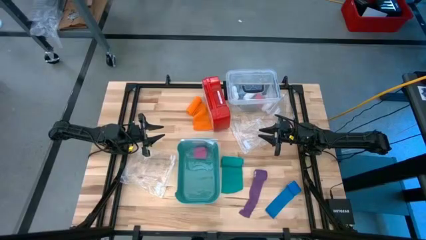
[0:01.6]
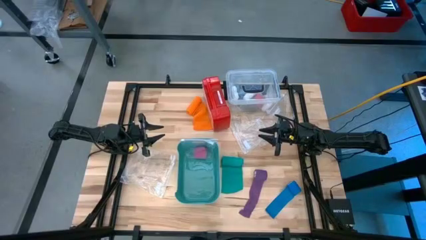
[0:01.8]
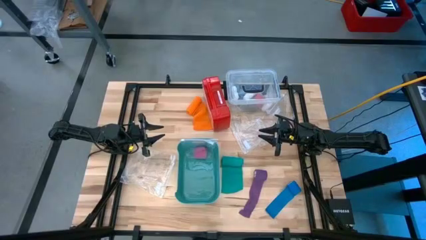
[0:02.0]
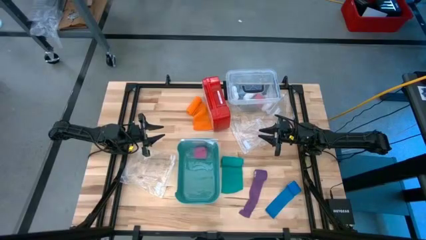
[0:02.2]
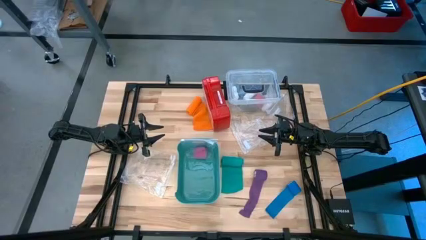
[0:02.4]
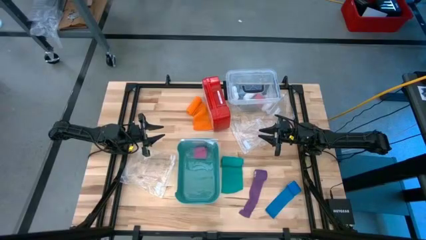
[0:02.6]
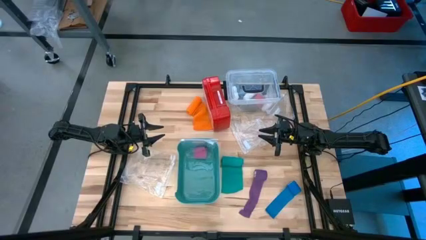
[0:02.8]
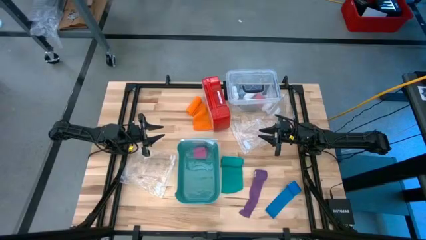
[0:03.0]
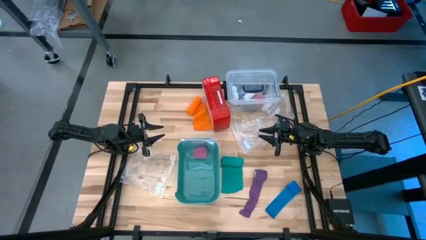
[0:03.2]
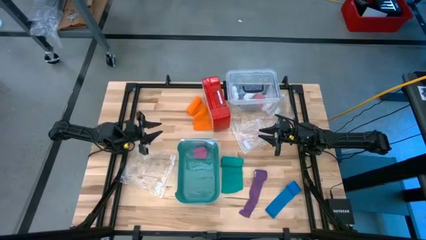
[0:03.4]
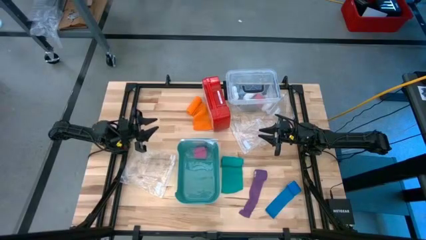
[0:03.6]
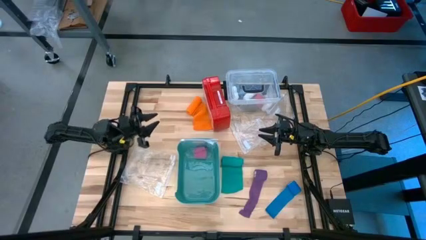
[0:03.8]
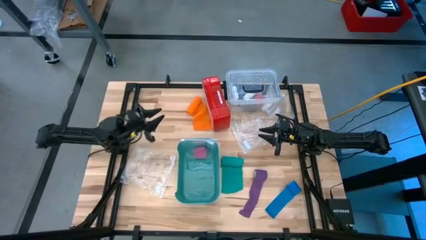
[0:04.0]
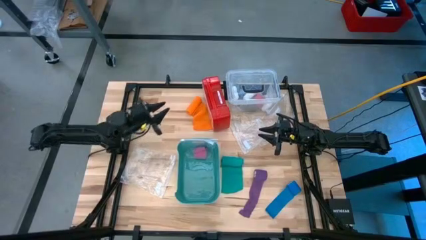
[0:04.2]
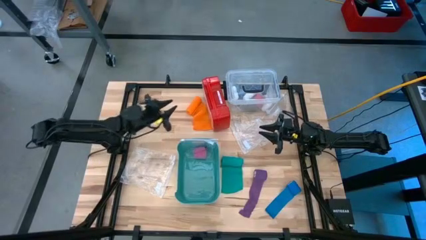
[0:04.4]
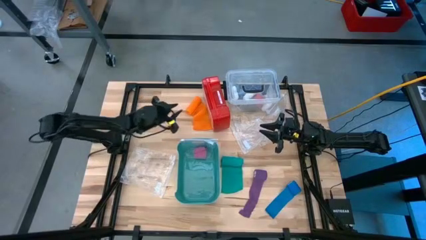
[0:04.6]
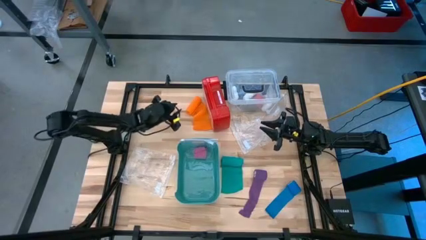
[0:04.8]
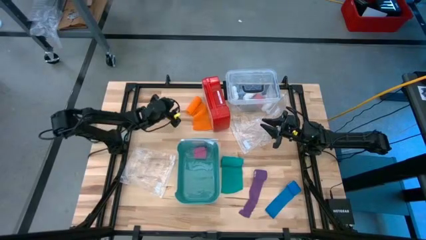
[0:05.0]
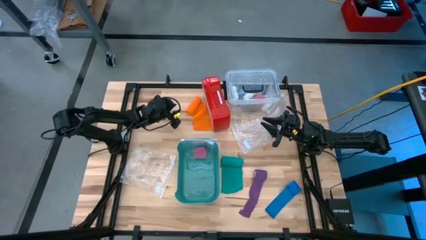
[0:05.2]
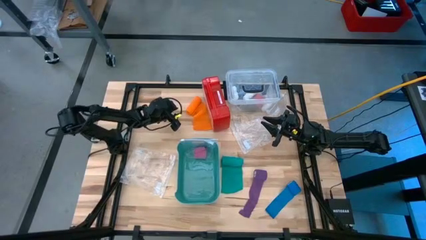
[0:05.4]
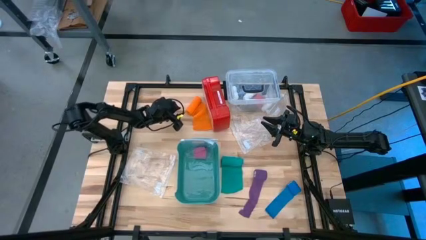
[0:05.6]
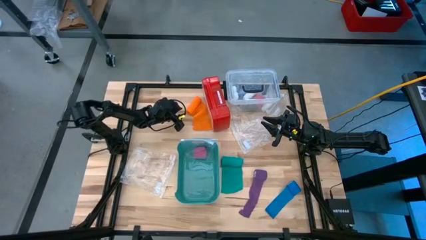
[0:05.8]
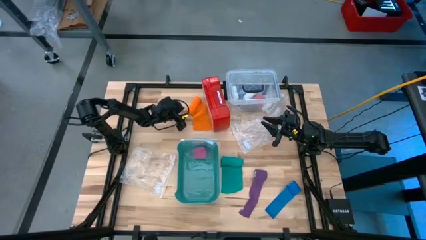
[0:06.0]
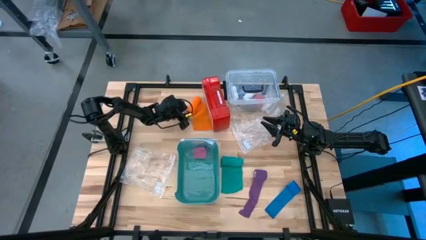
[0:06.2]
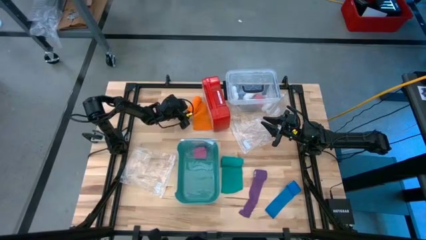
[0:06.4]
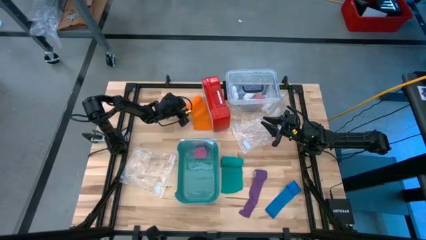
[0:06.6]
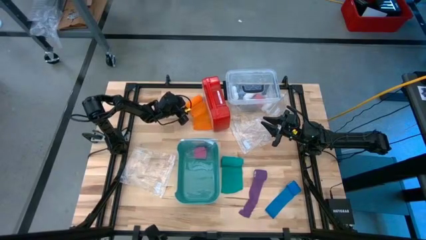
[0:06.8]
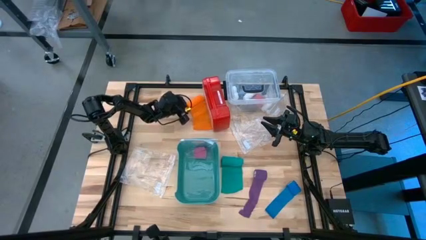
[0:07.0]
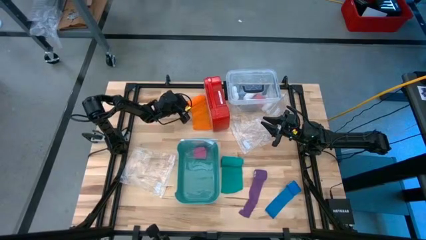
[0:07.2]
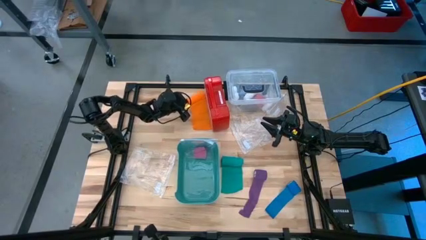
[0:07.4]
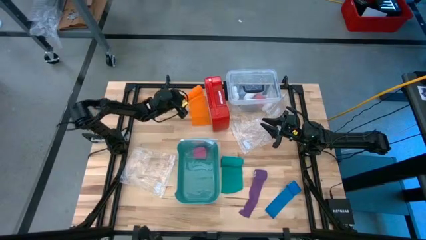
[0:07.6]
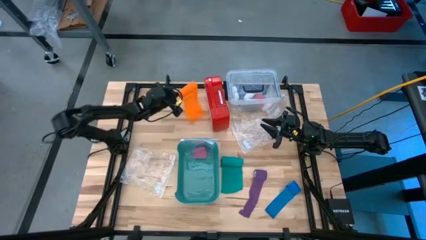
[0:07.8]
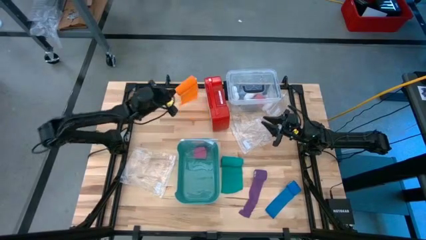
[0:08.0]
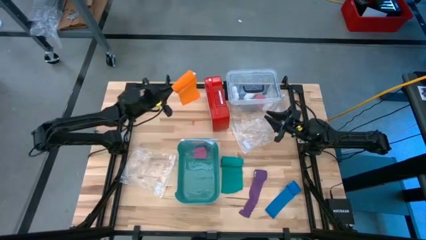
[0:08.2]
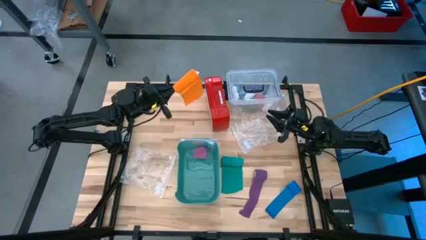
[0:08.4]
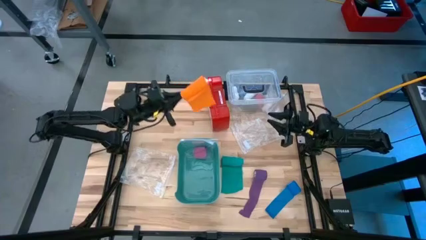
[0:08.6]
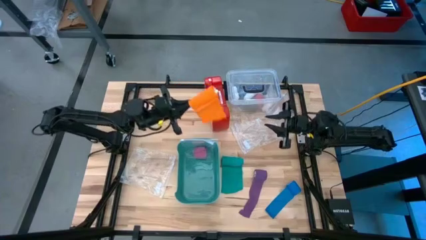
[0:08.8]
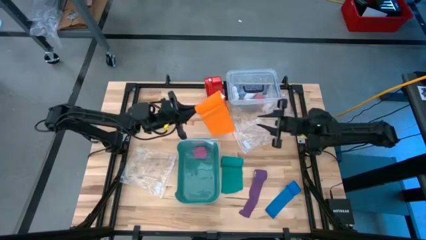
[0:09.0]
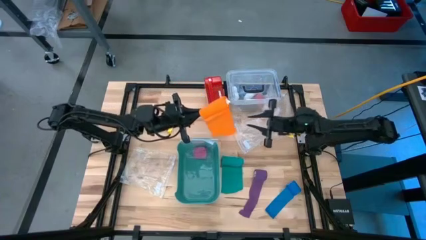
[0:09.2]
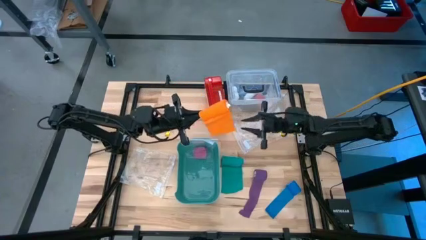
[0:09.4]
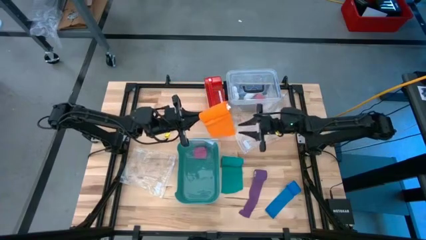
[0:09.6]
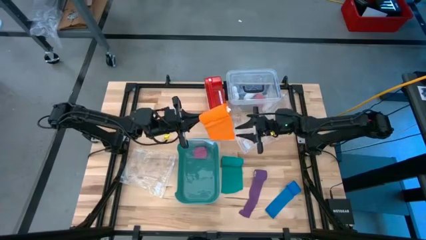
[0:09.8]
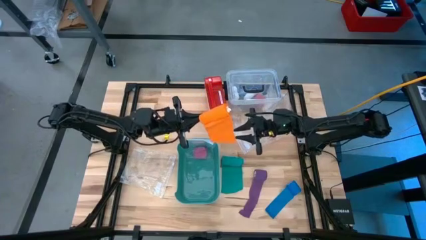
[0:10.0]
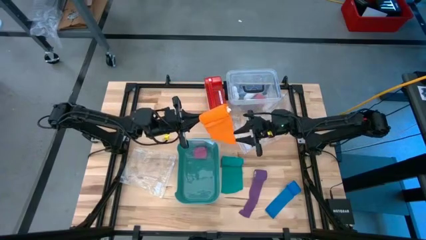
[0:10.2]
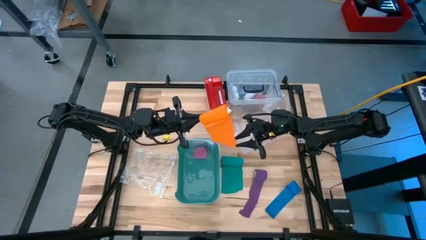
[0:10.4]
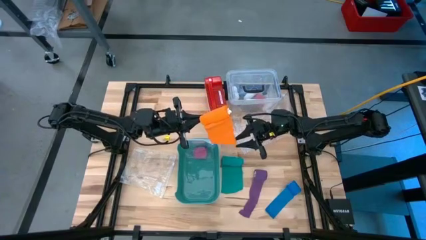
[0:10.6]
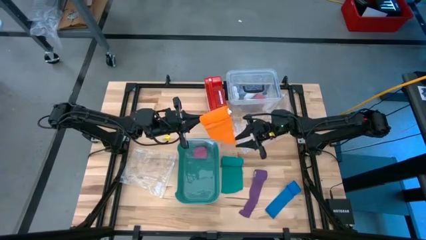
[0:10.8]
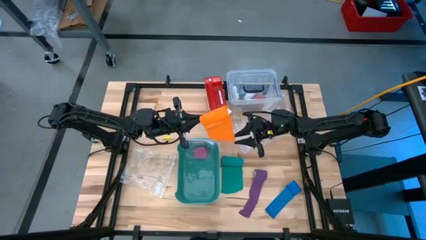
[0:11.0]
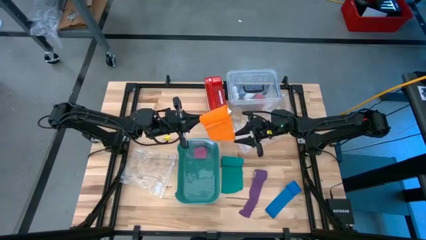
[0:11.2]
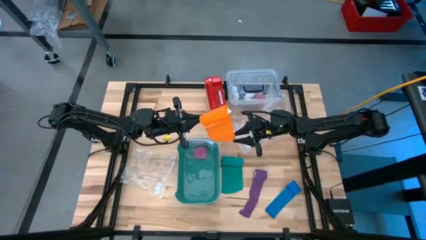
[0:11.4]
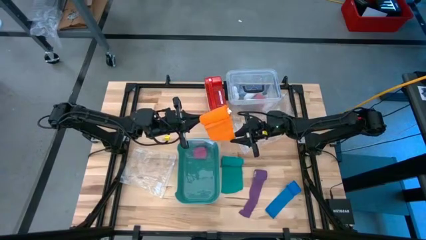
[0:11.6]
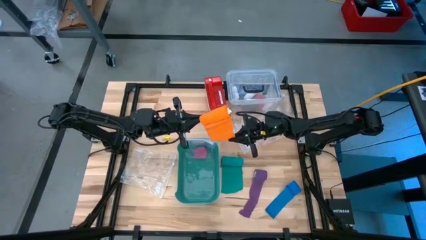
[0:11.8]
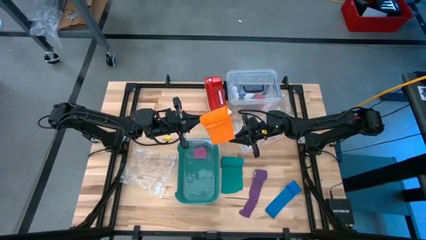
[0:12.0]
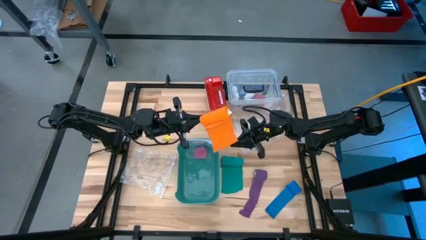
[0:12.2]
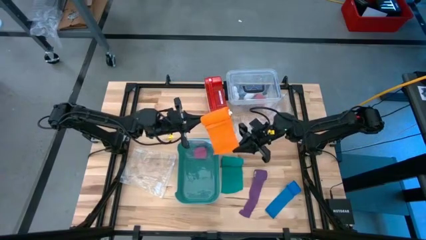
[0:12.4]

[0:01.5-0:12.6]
Task: Roll bandage
Roll the orange bandage
